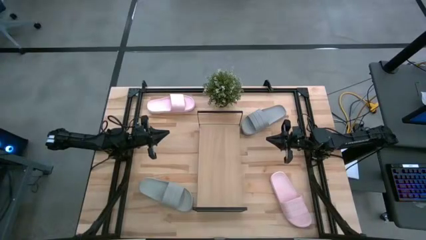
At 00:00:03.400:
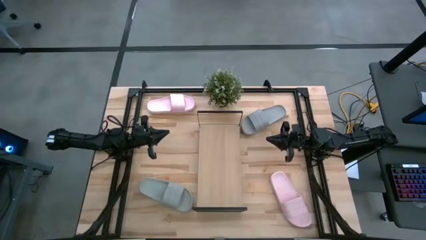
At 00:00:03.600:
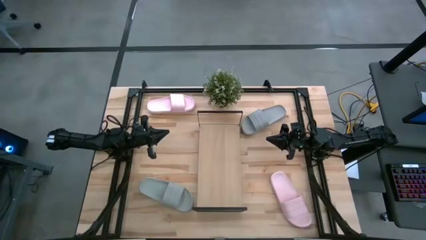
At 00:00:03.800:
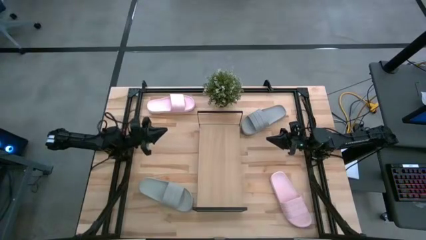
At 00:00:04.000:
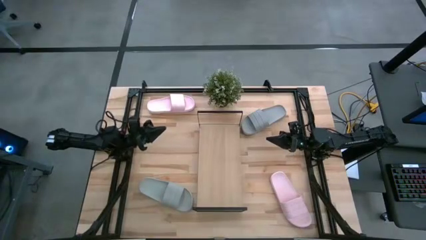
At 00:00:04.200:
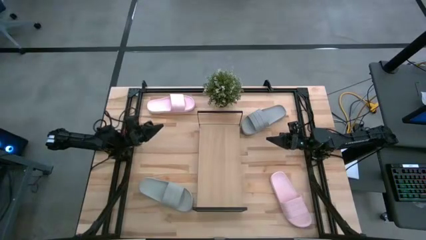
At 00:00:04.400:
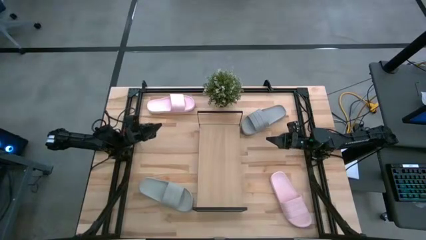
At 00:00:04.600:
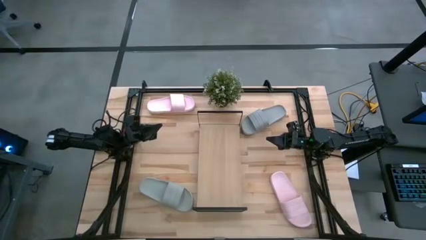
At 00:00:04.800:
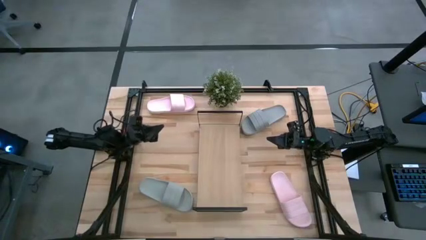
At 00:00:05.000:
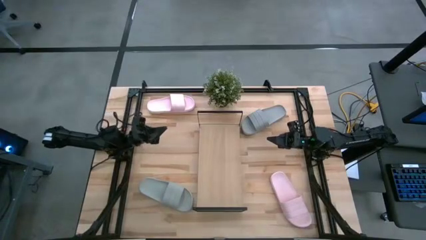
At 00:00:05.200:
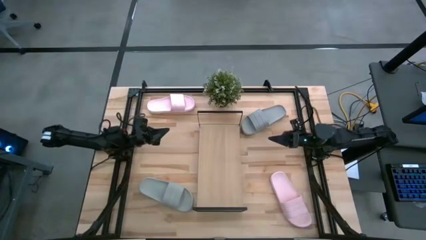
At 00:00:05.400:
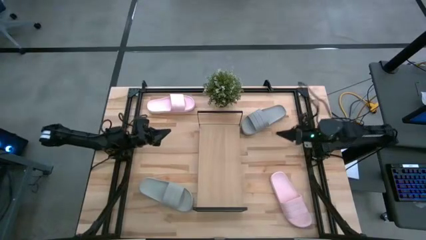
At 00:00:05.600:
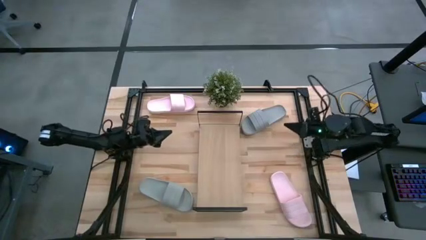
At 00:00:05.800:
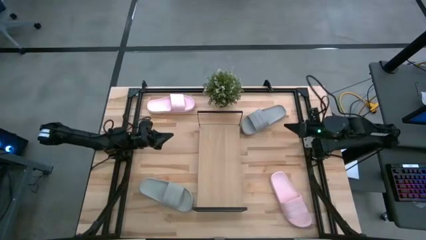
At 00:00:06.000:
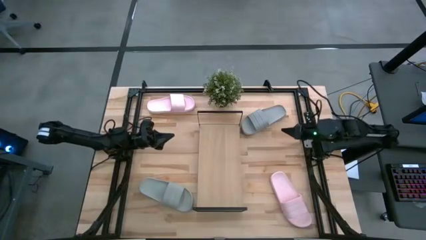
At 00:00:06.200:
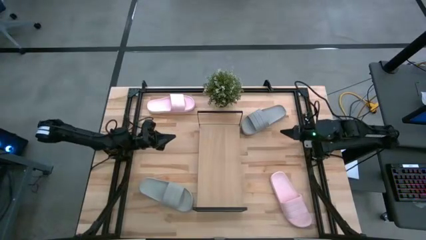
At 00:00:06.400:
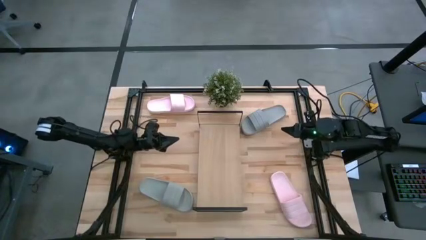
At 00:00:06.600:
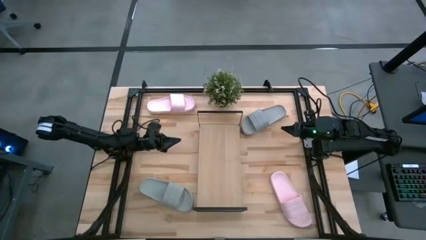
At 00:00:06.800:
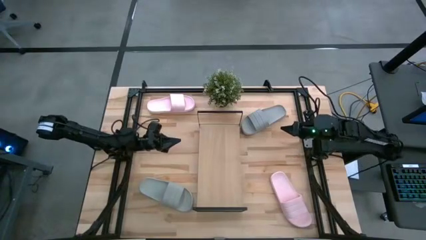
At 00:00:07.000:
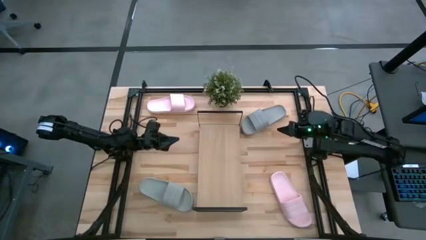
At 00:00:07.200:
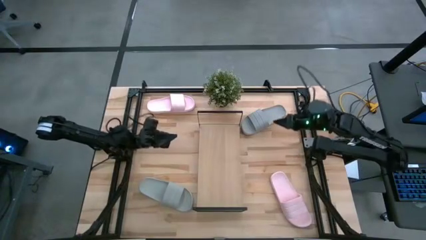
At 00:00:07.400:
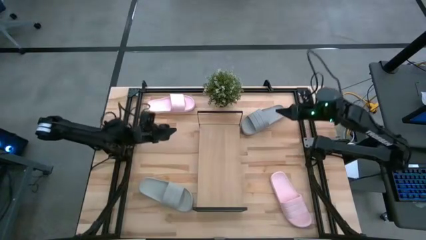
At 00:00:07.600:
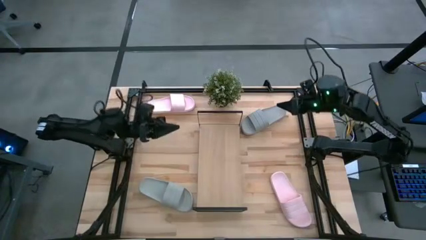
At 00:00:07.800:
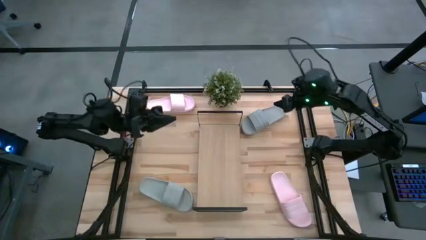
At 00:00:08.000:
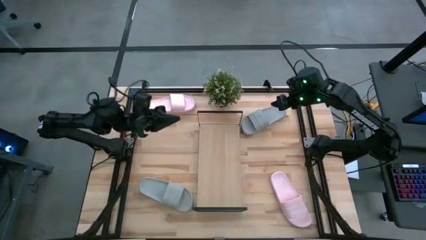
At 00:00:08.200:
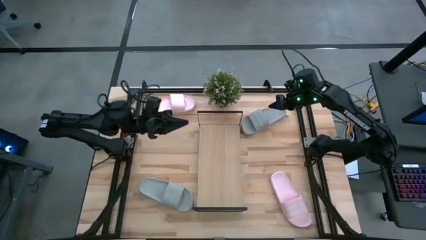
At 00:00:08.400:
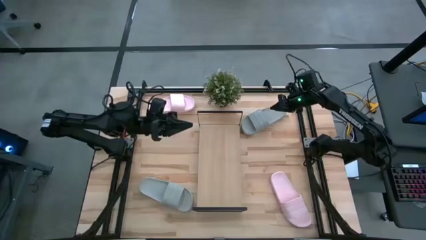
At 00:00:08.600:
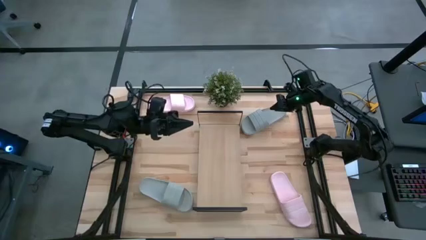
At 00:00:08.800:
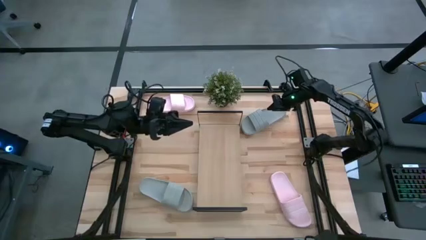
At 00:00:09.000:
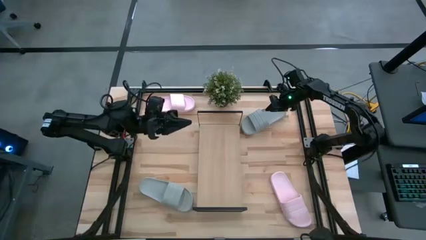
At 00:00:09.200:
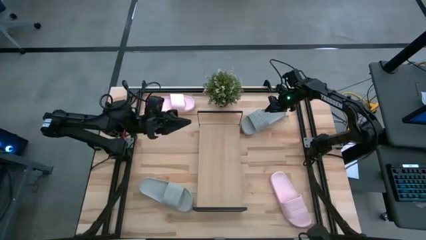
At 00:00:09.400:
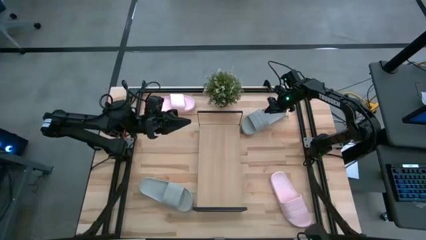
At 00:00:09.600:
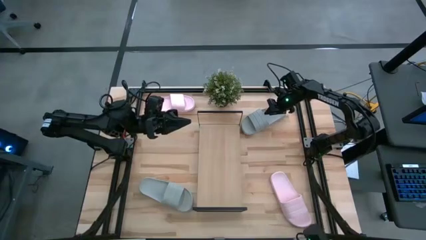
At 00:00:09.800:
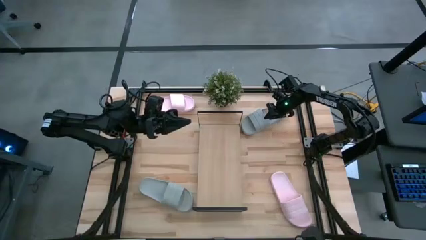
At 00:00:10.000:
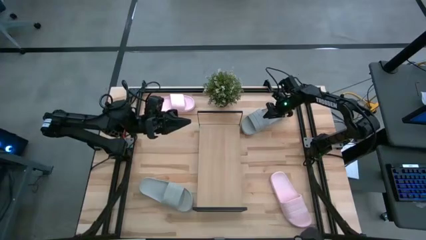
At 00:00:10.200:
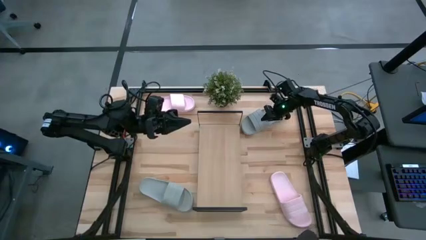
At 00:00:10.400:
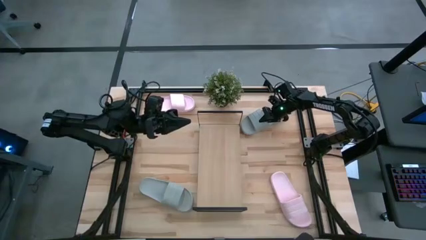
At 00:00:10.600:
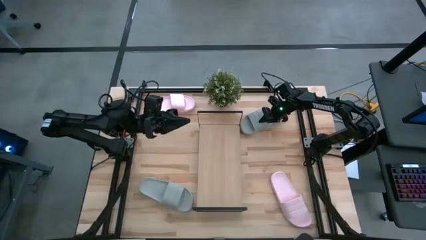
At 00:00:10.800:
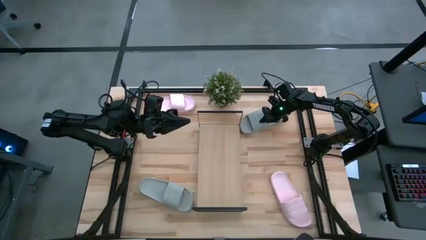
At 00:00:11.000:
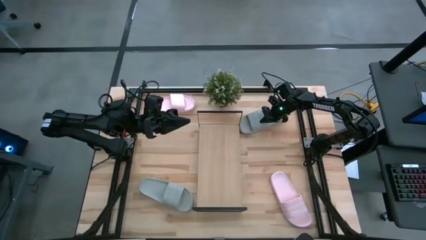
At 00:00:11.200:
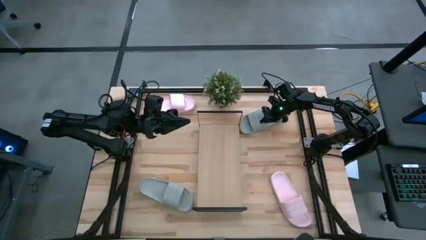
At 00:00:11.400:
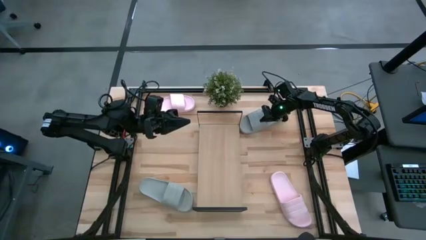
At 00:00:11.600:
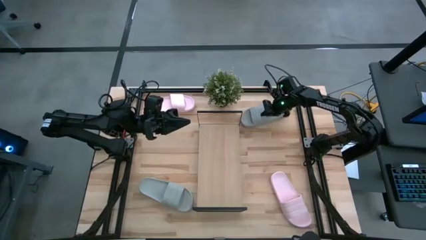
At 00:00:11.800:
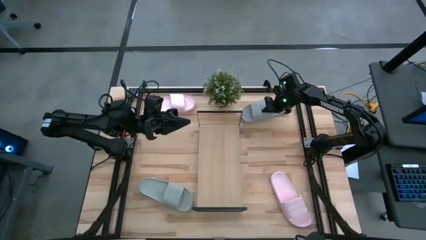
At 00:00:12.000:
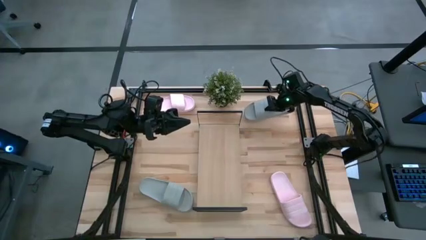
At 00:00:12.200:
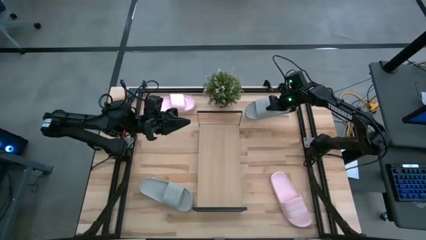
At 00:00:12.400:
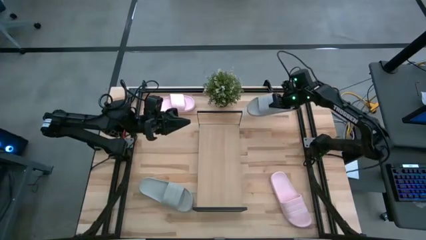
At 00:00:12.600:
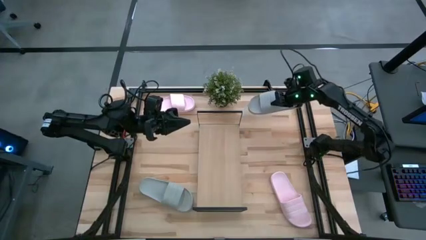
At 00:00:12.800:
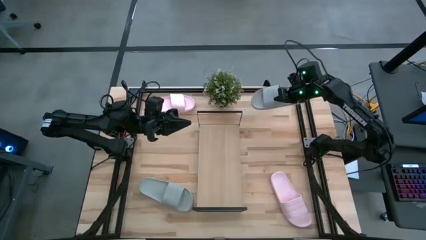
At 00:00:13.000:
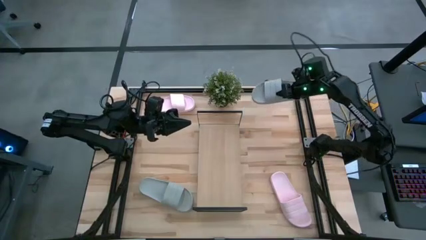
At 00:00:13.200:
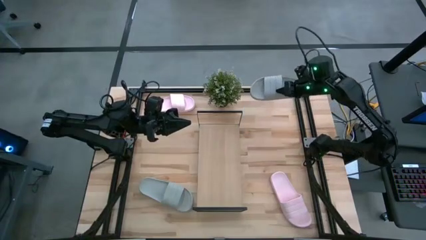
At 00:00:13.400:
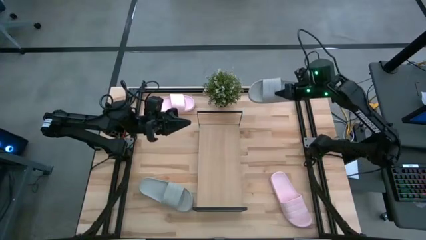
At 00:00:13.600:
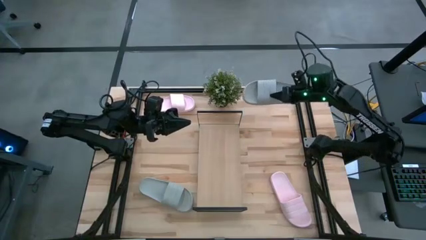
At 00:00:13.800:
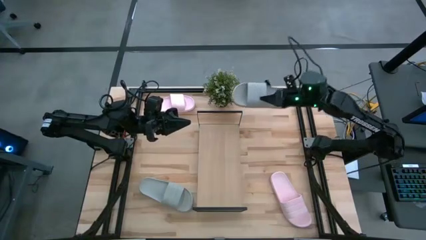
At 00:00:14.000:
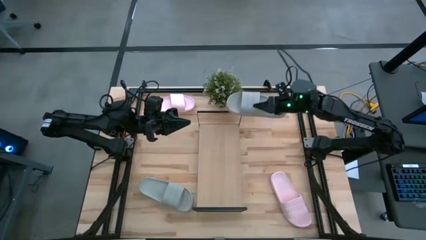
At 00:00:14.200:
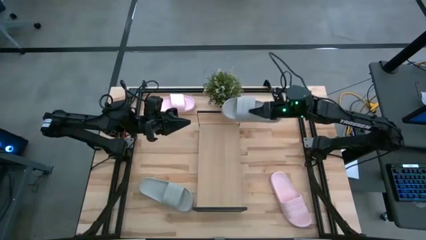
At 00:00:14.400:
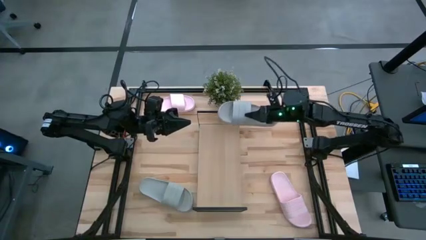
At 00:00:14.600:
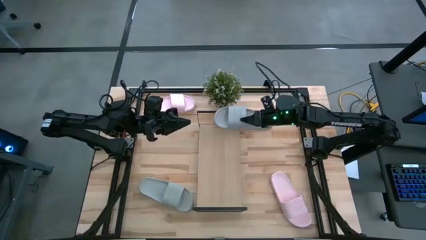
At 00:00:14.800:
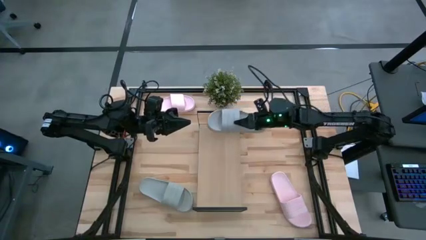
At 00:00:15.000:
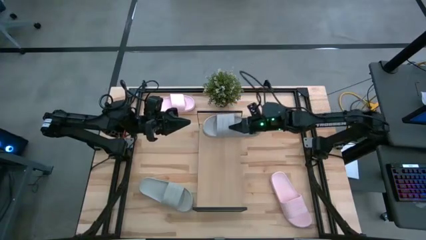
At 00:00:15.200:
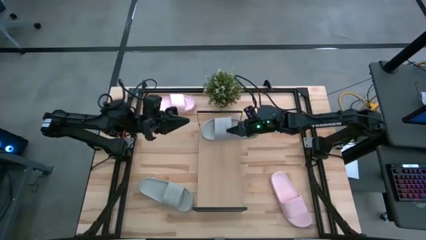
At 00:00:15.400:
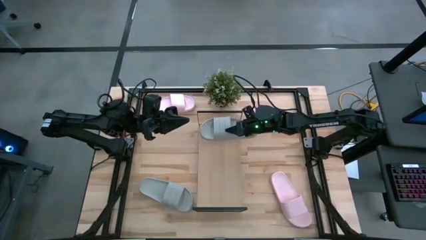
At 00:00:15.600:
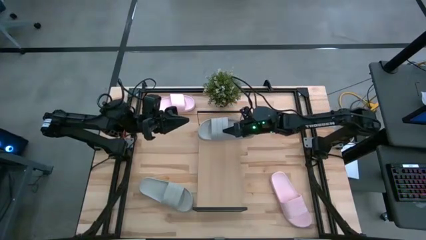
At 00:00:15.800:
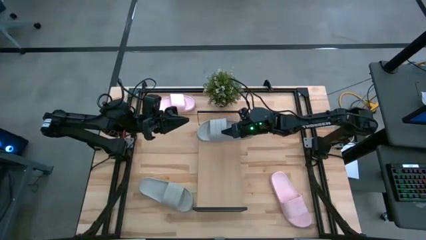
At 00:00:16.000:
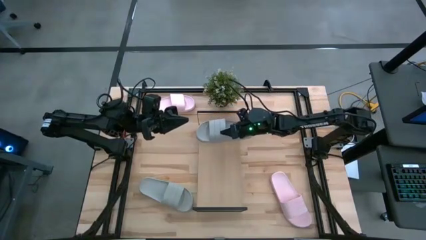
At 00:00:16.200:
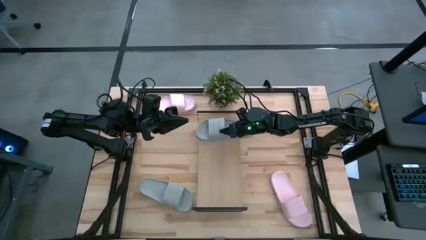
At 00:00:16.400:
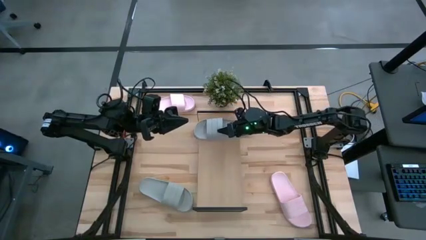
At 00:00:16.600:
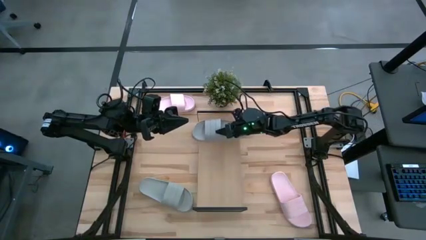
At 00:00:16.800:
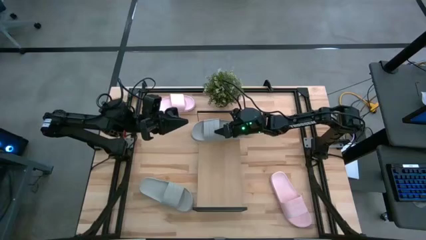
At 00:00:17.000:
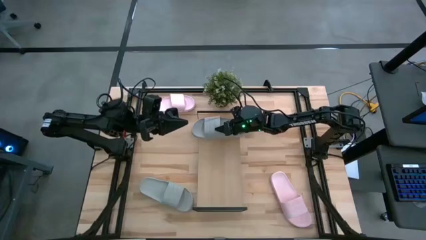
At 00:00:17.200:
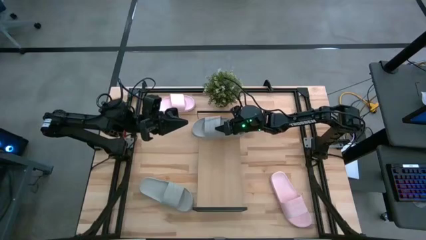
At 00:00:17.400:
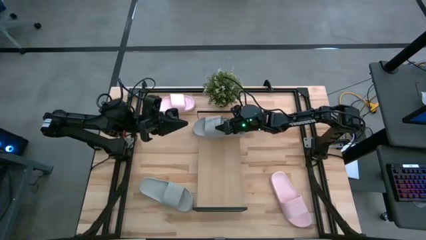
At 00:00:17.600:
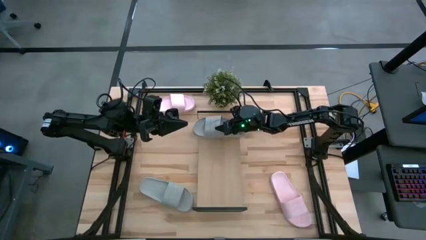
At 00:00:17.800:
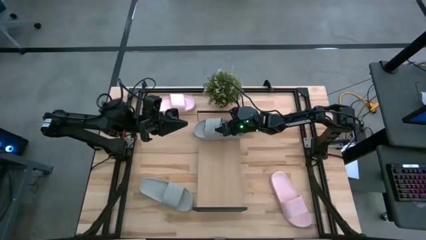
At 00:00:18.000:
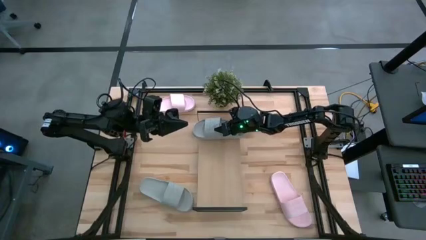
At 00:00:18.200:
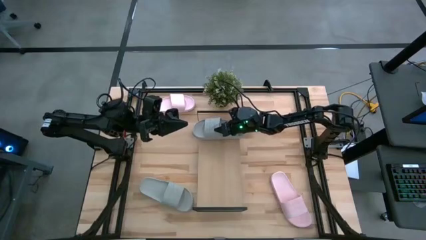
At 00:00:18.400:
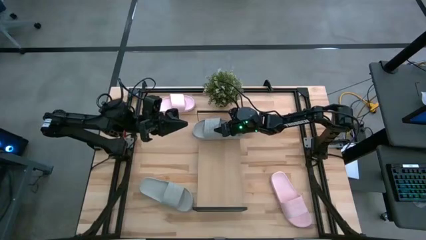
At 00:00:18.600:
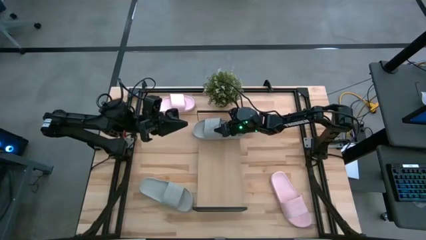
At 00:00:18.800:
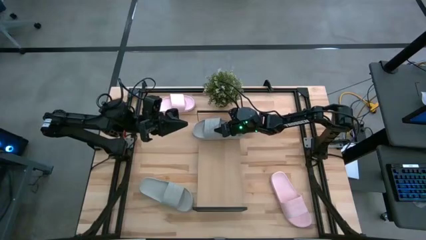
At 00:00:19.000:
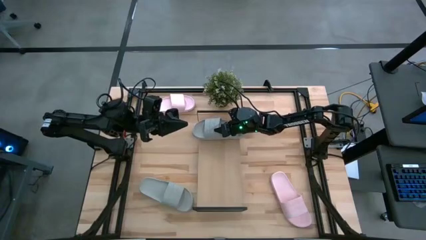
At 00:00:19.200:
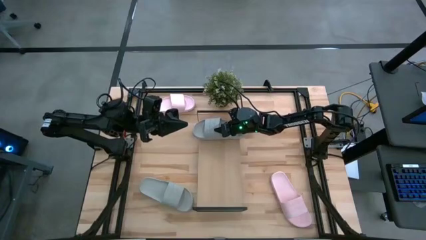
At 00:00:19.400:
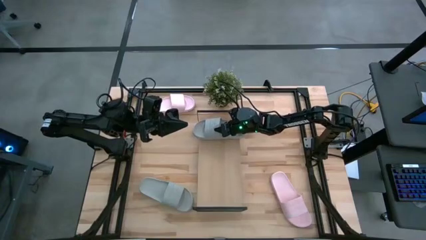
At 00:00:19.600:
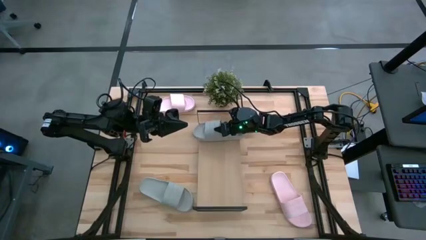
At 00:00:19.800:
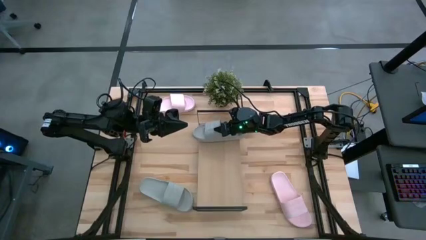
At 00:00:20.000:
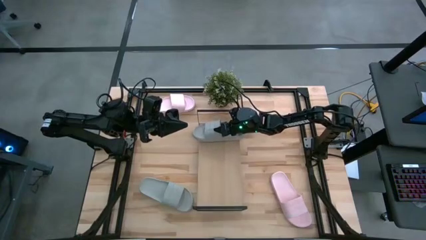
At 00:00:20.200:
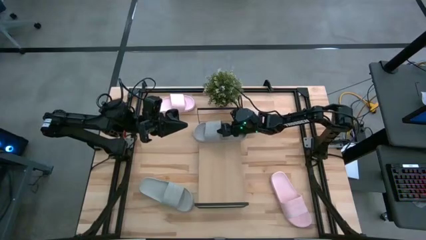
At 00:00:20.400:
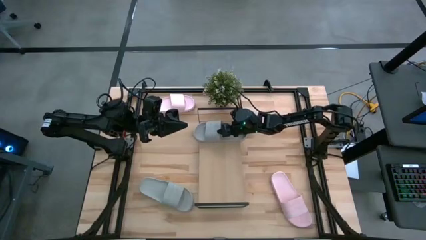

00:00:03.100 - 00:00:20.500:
Task: Pick and place slides into the shelf
Put the top gray slide on the shelf
